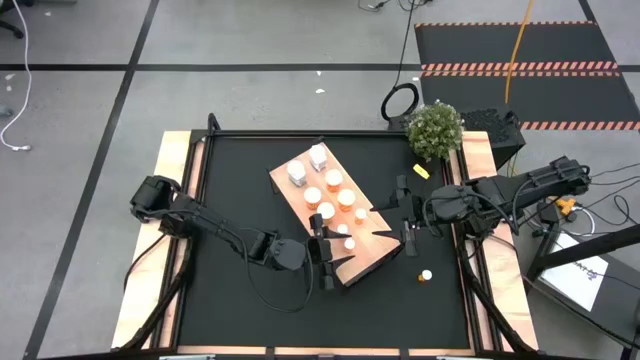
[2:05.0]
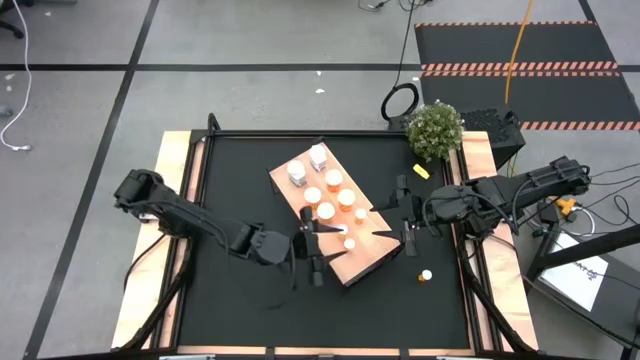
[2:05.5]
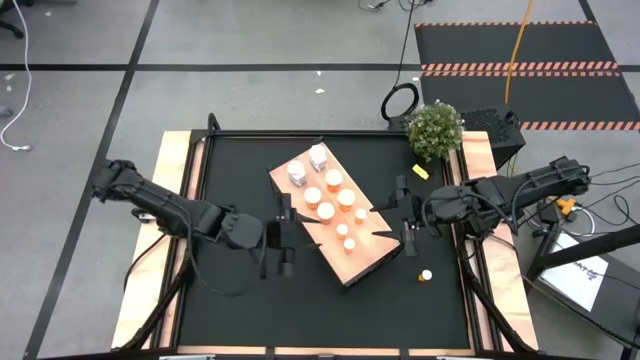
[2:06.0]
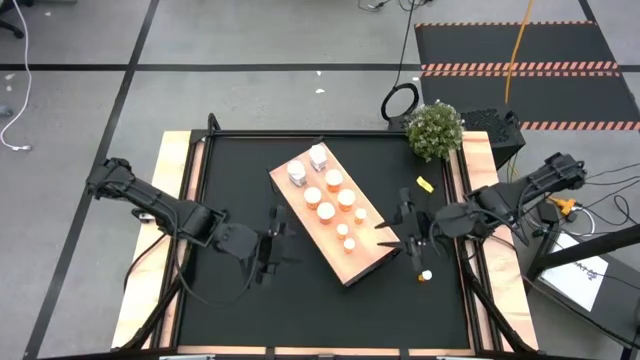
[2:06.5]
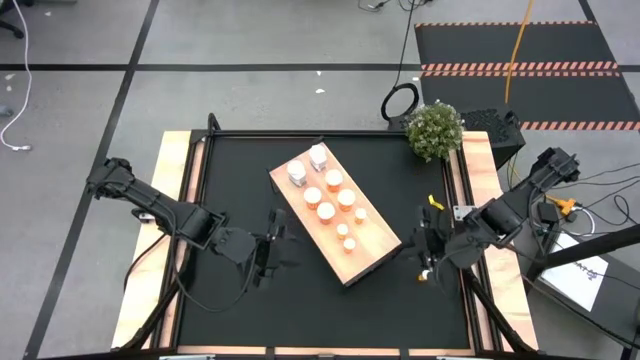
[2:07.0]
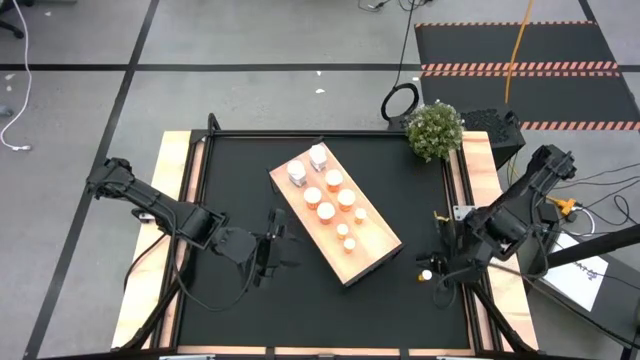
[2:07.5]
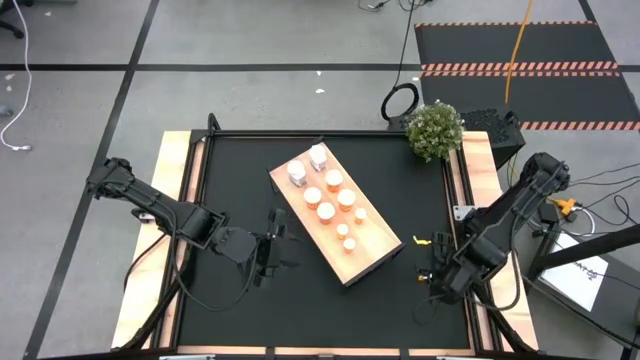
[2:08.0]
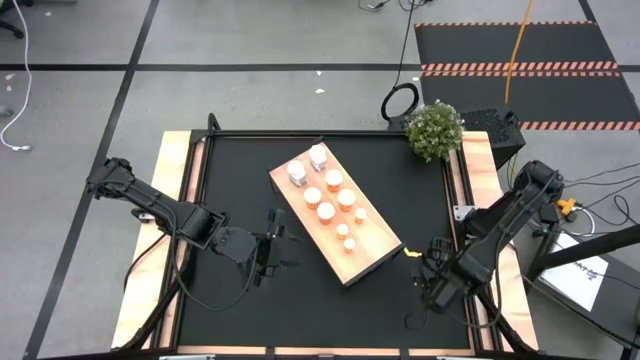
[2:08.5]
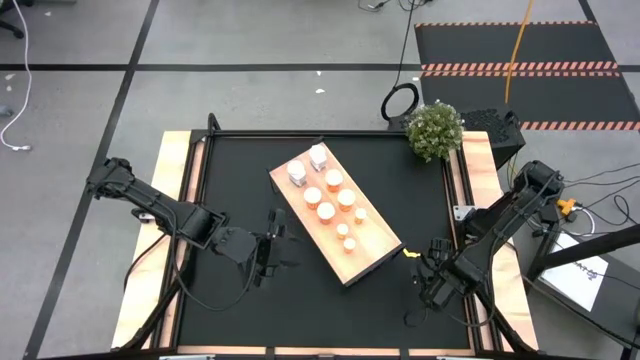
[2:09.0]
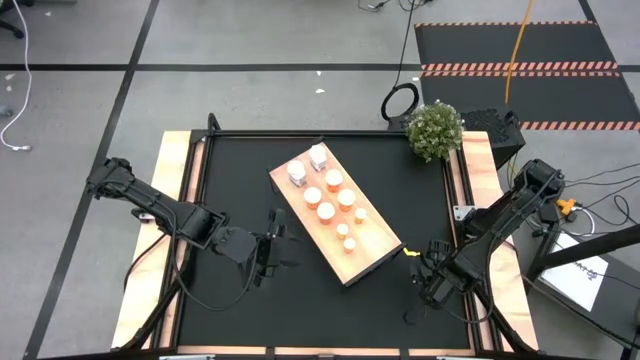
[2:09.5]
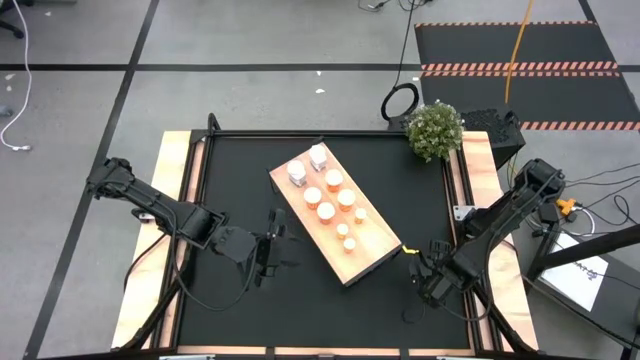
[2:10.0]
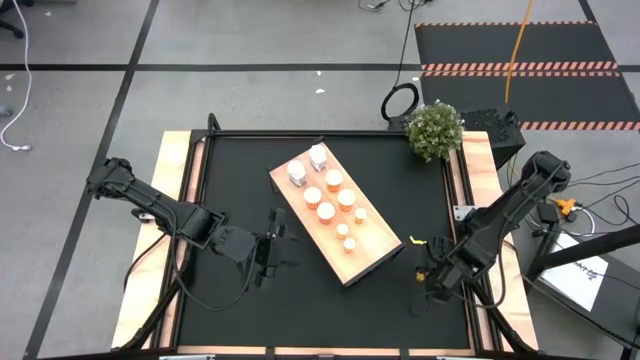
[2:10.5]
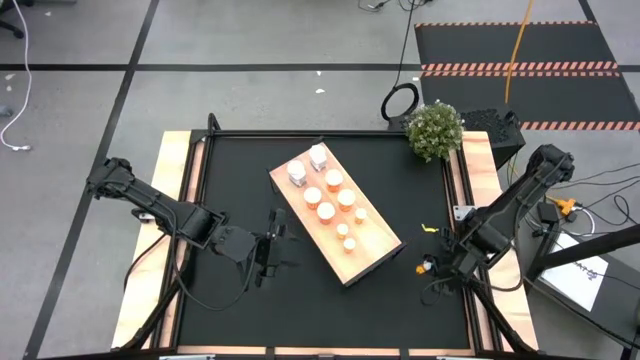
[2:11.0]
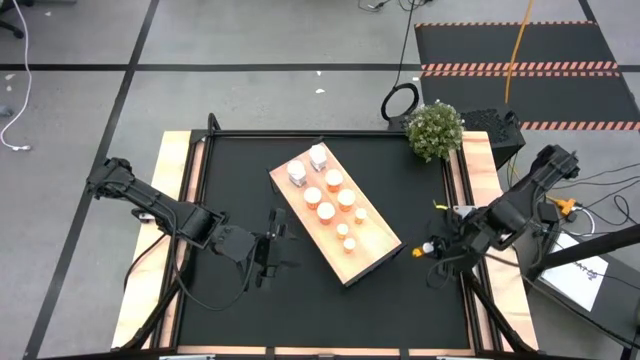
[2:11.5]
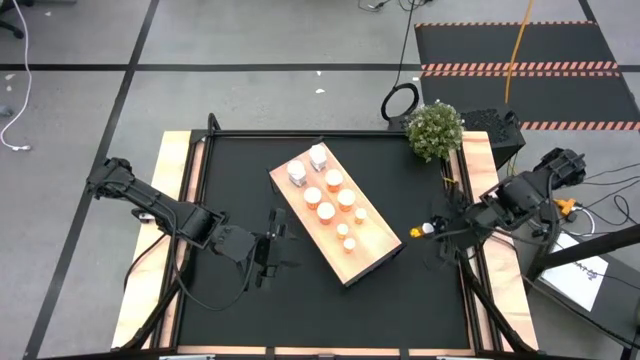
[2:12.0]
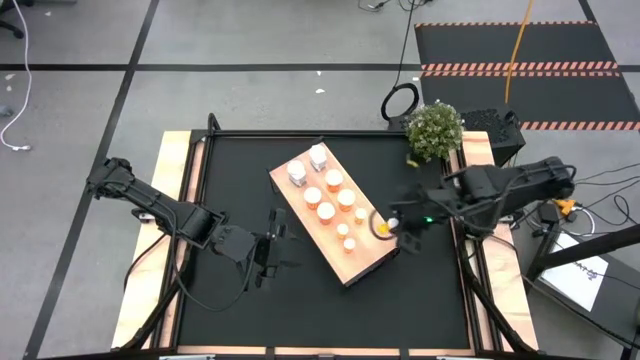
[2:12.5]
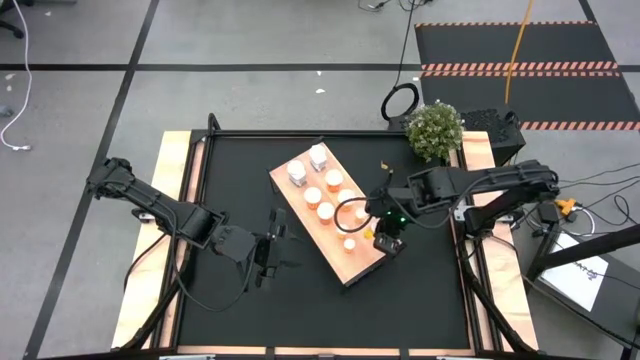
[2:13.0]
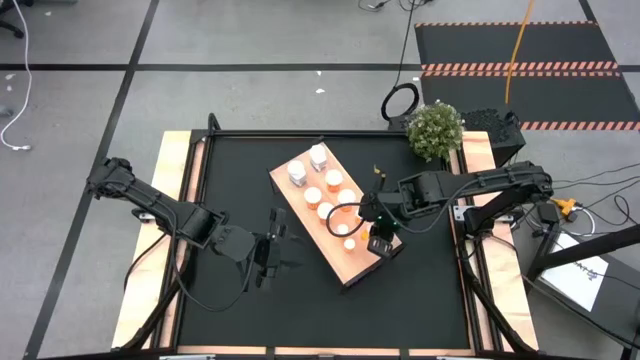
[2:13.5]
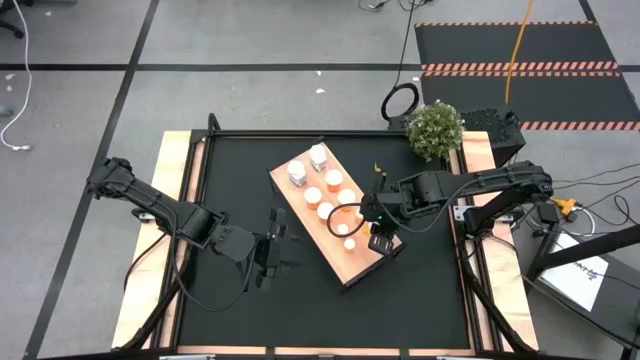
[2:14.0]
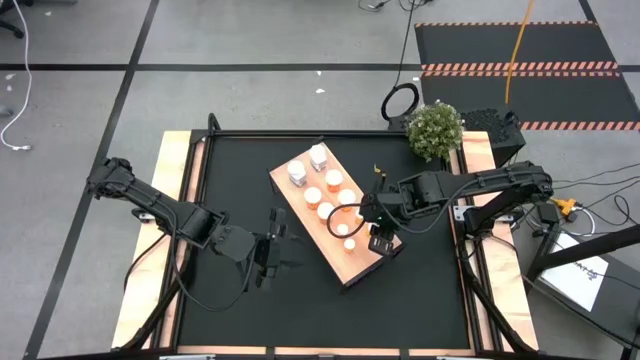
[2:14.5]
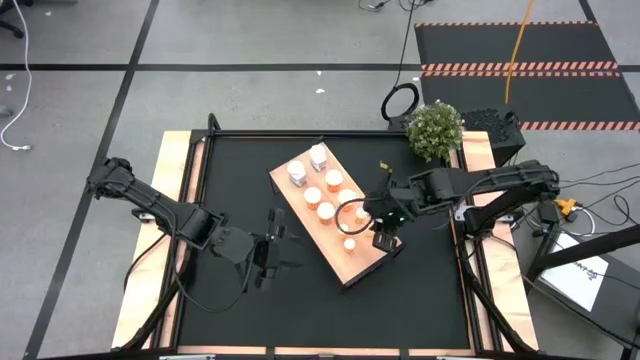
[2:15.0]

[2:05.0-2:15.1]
Task: Pick and place medicine bottles onto shelf by color
Put the orange tablet bottle on the shelf aligned with the orange tablet bottles

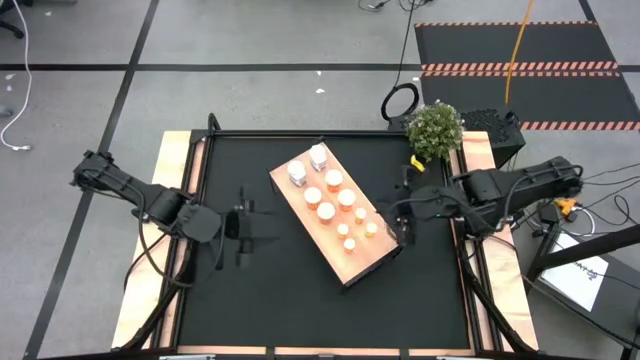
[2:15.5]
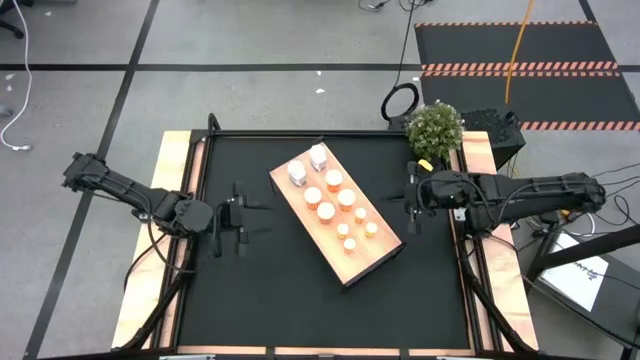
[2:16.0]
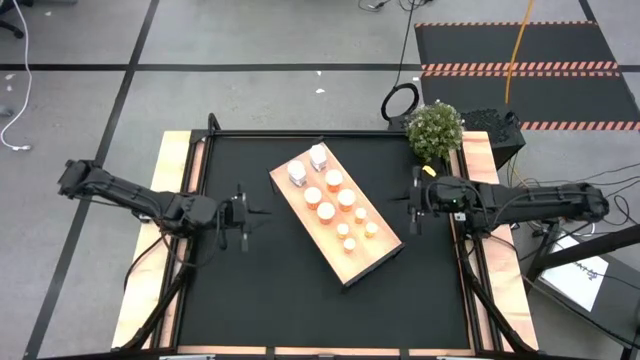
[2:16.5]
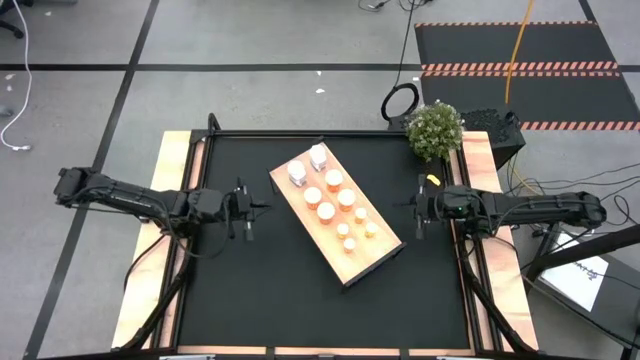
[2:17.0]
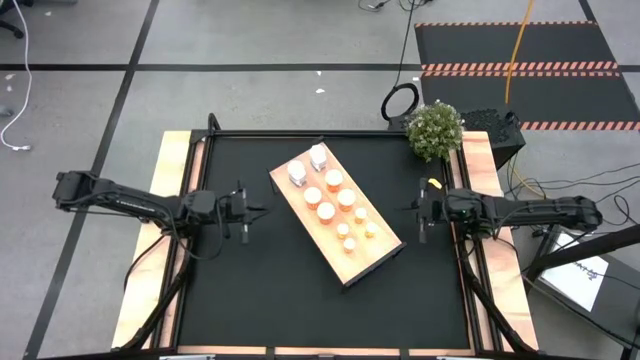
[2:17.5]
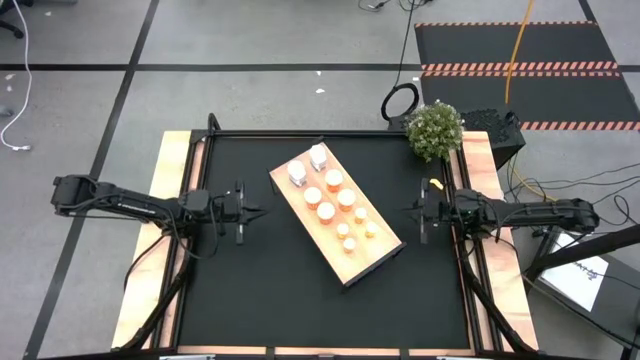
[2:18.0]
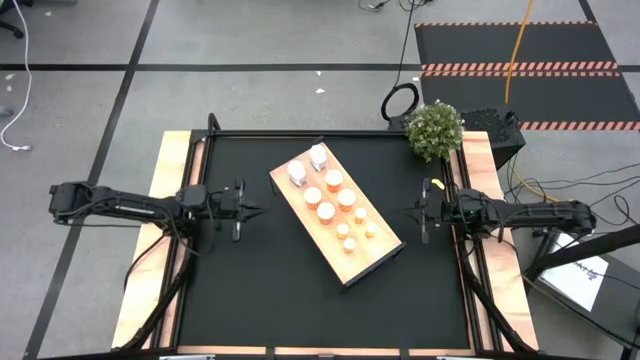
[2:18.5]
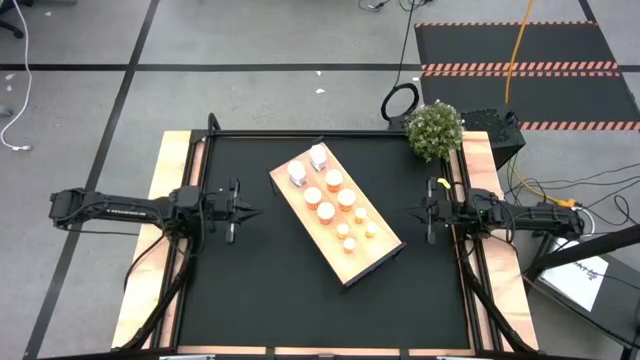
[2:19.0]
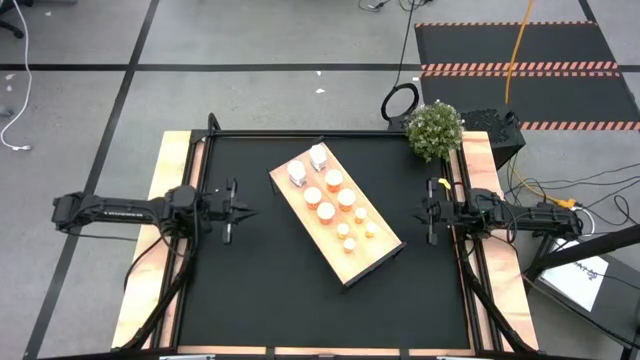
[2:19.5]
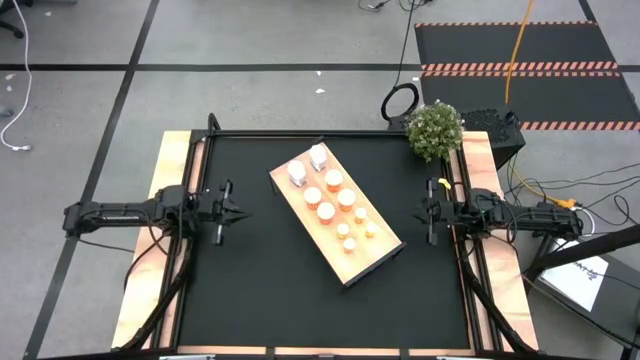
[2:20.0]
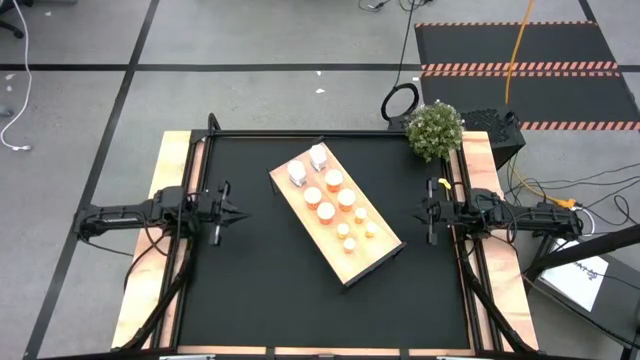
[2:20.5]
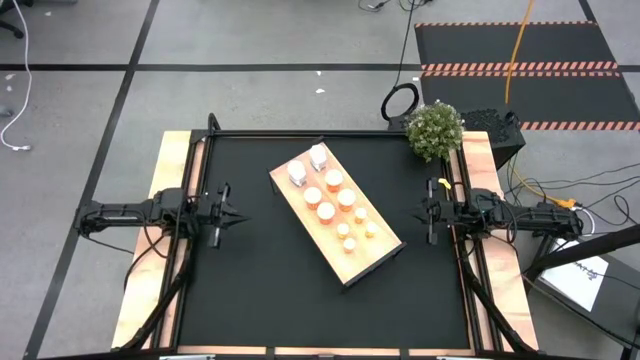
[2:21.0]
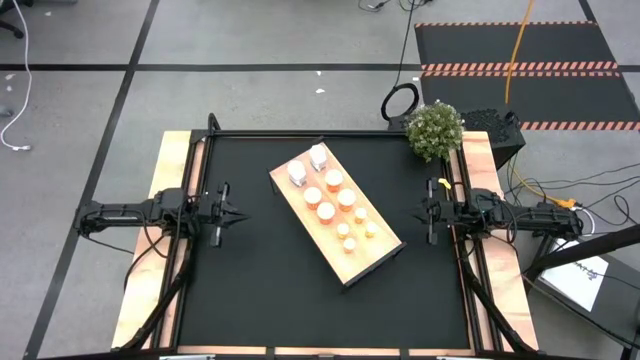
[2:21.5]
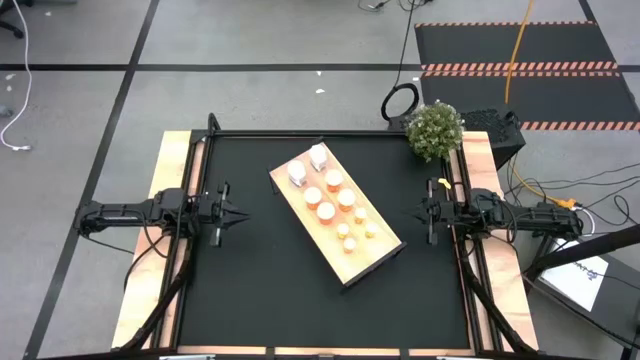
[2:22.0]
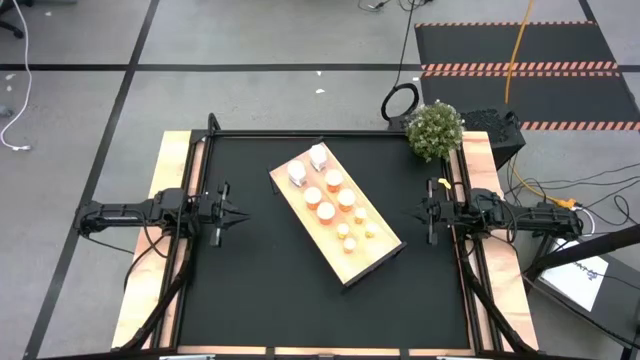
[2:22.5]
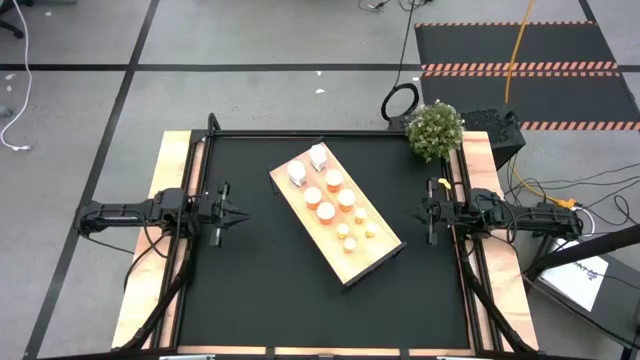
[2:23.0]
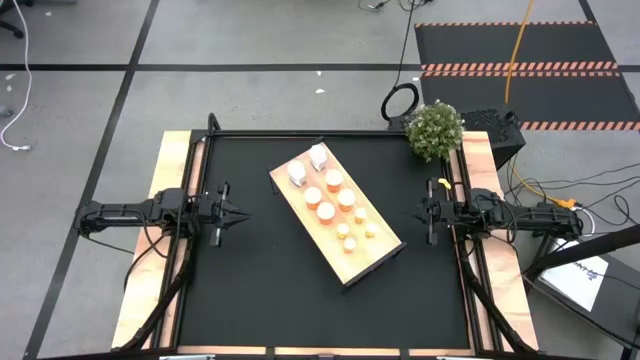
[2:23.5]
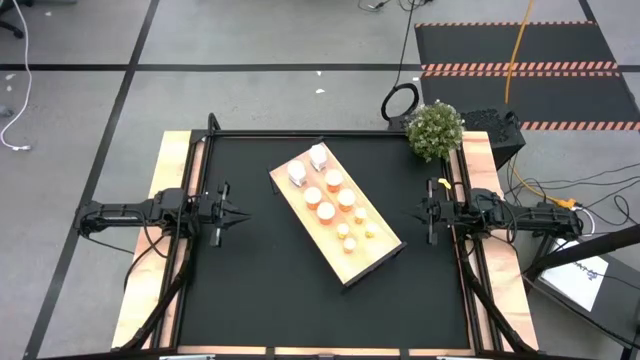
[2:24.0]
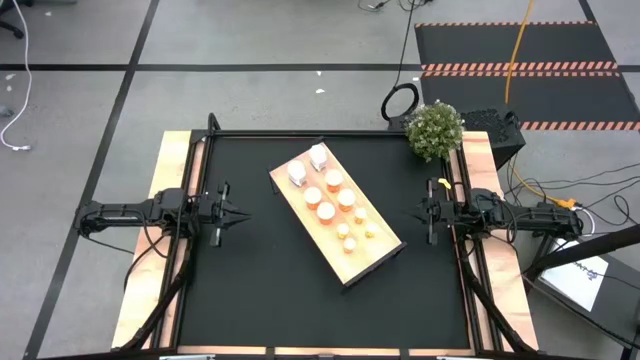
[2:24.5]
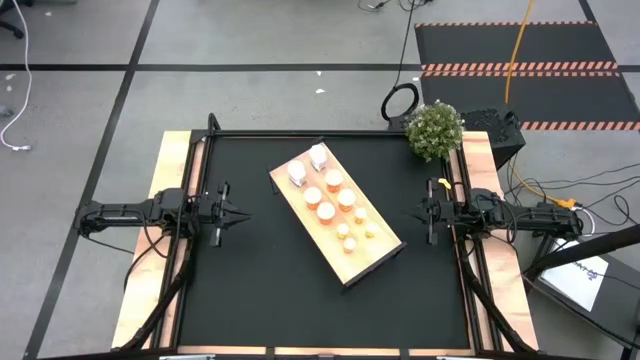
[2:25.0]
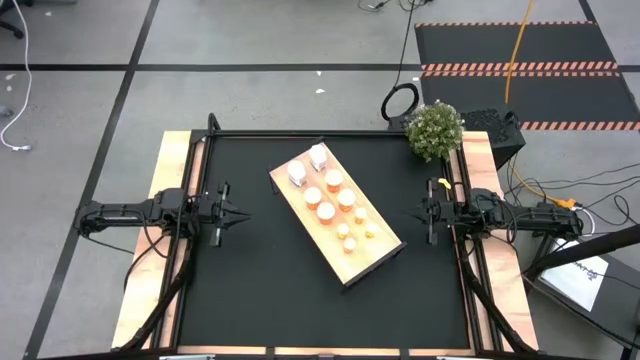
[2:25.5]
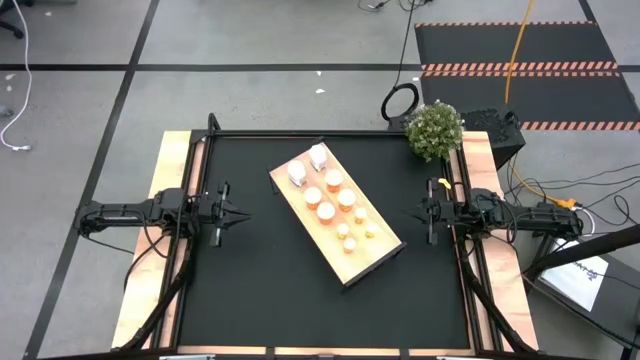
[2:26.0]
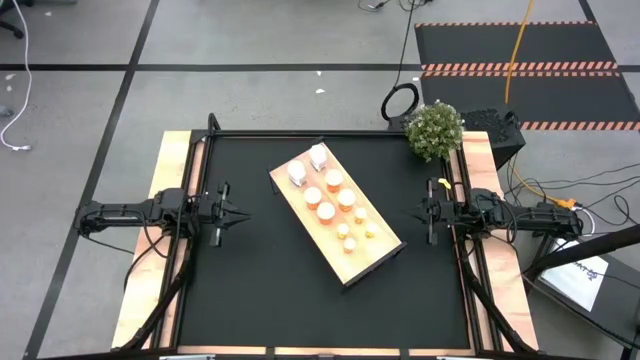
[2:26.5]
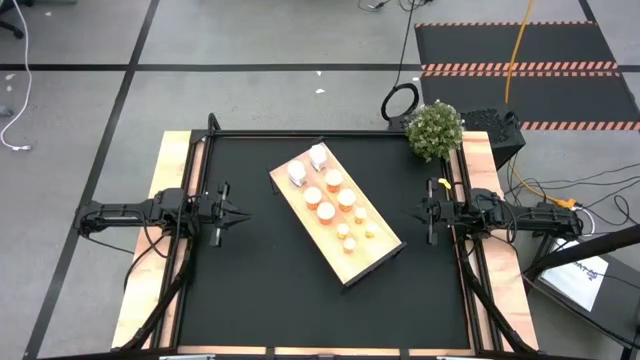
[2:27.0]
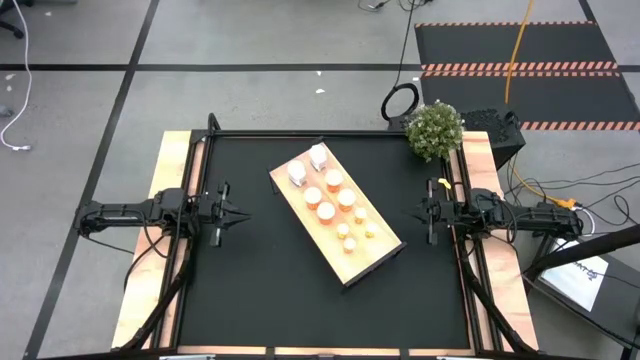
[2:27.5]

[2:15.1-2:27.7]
Return to Home Position
